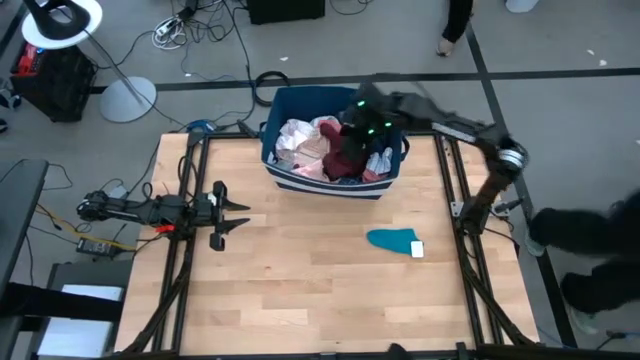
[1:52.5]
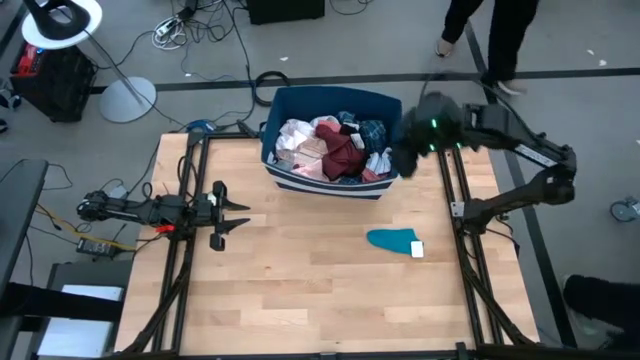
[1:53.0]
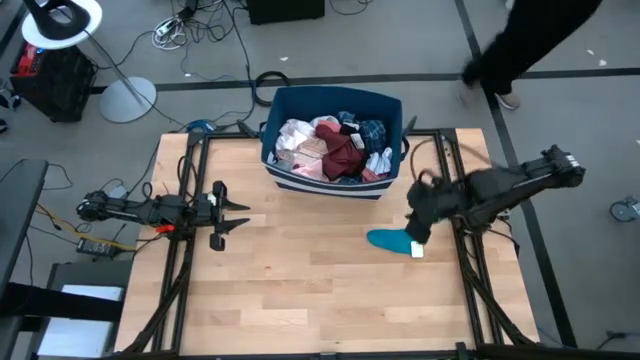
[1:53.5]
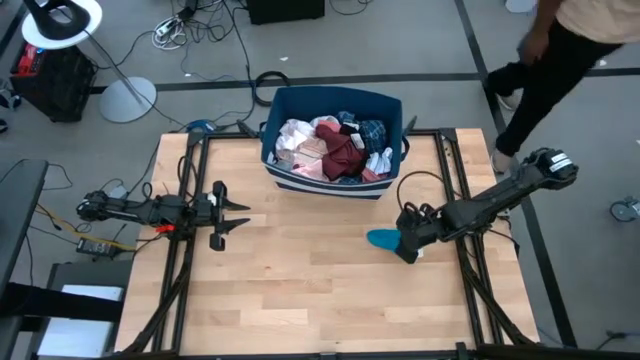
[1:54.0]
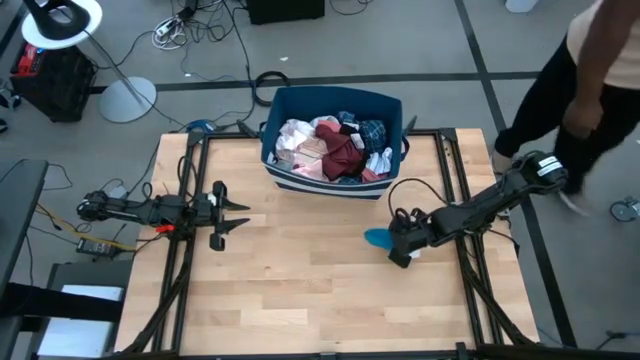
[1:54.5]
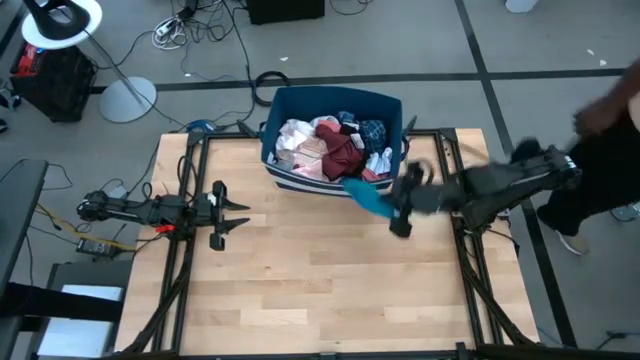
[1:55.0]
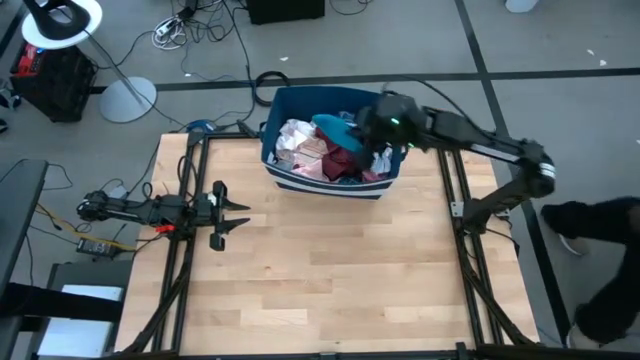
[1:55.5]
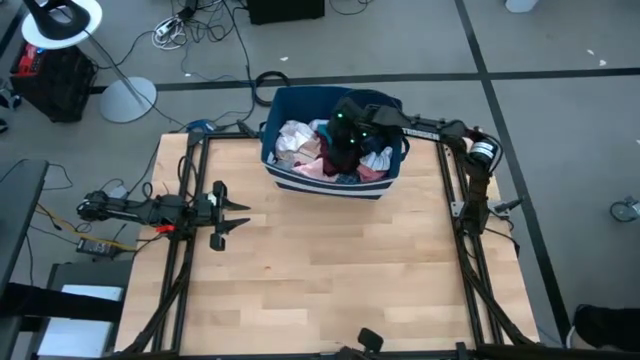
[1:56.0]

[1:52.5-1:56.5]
Task: Sort clothes
Put the blue sock into the blue bin

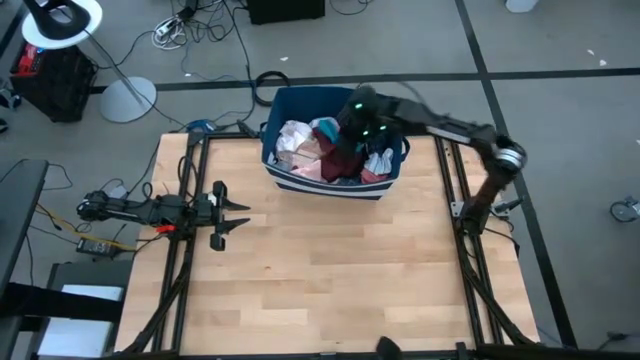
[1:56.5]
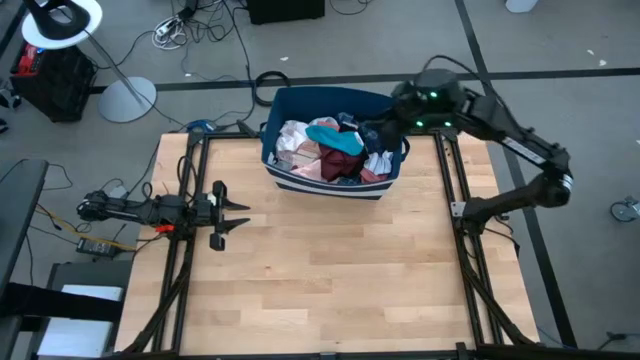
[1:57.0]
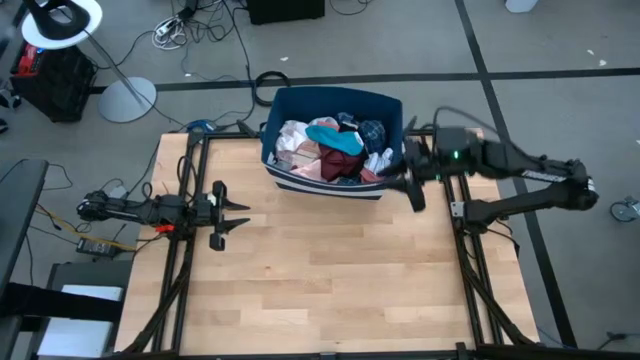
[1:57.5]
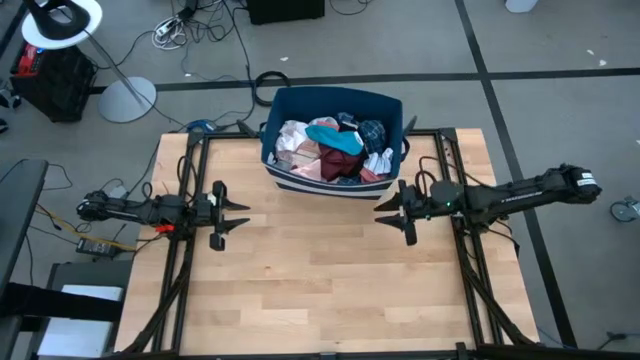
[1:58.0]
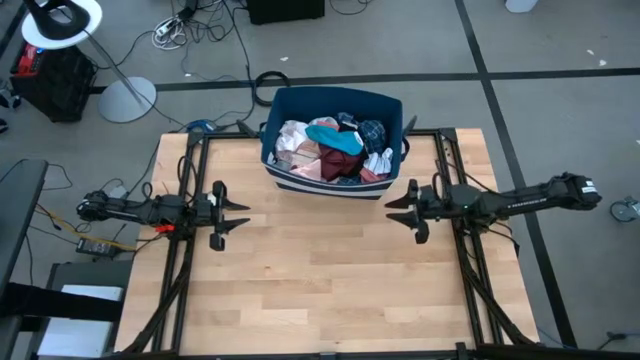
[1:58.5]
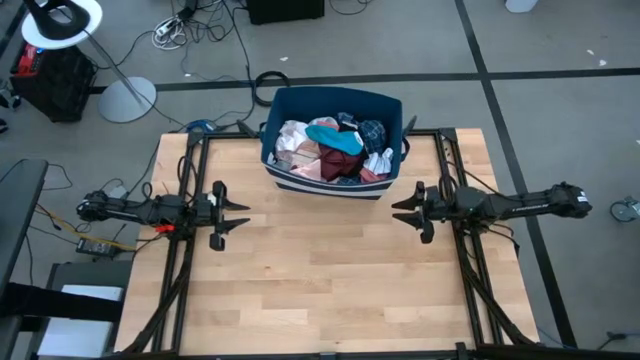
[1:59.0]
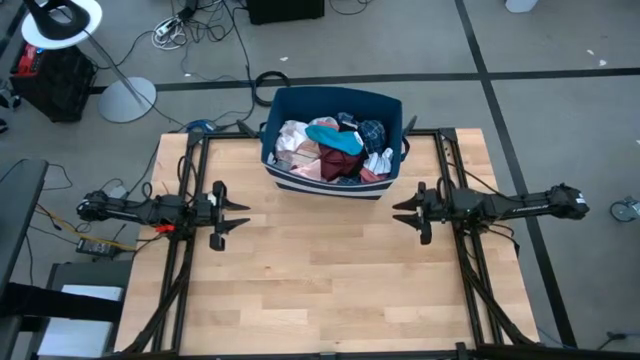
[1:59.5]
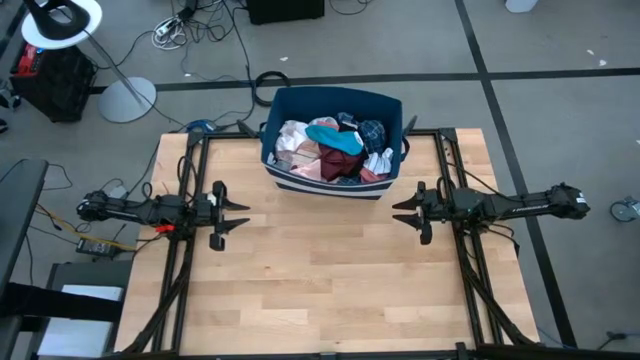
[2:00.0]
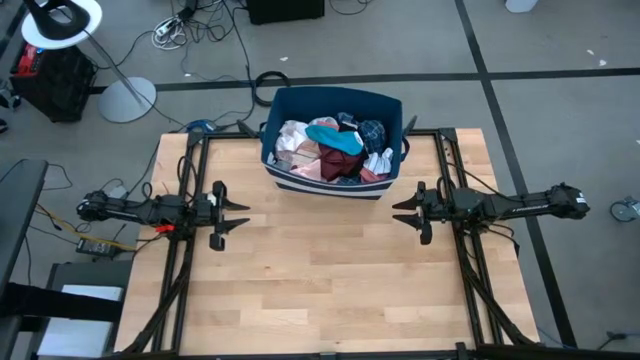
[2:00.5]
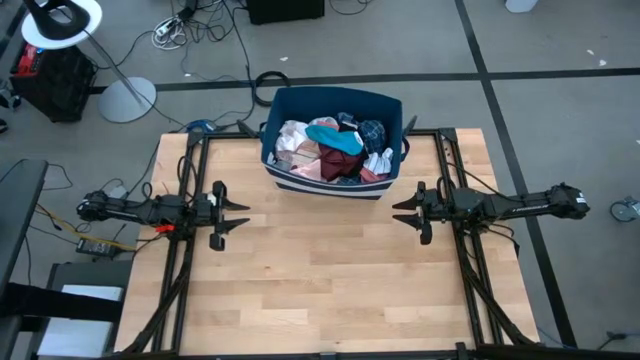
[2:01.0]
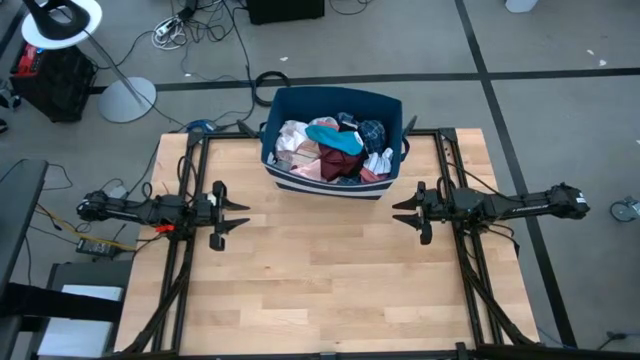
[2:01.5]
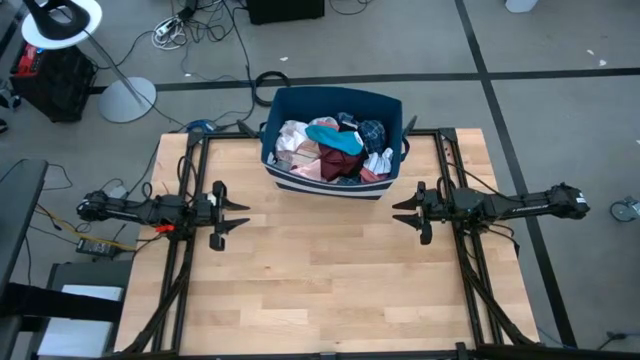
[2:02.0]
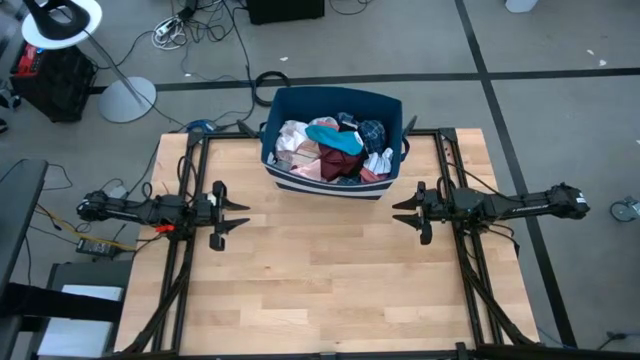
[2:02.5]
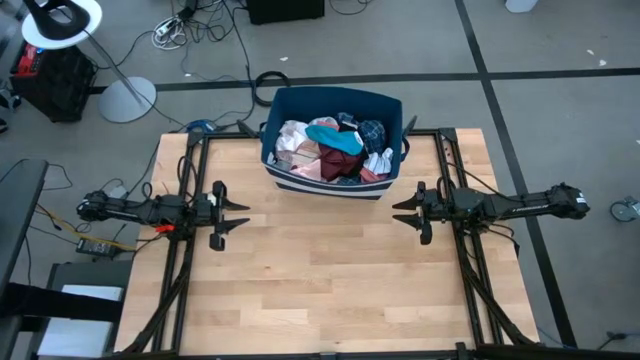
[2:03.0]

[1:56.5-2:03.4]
Return to Home Position

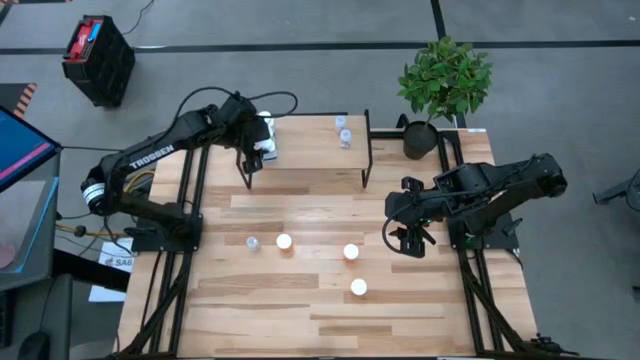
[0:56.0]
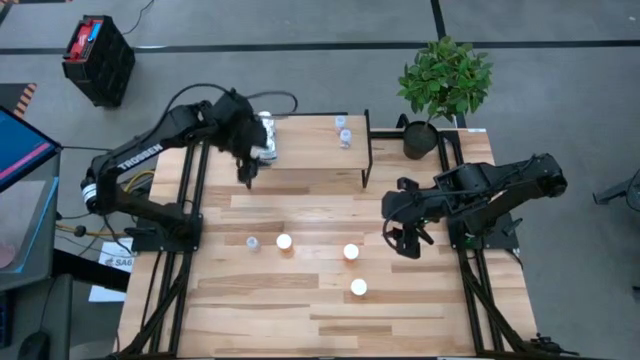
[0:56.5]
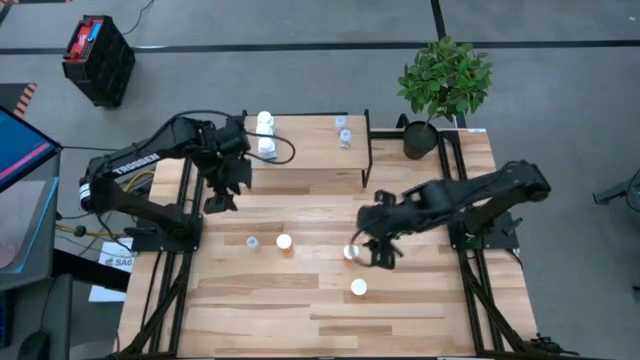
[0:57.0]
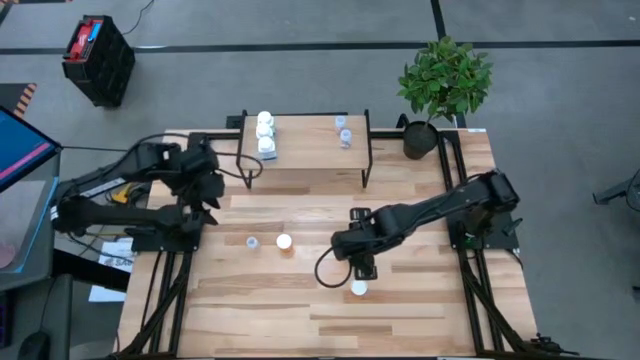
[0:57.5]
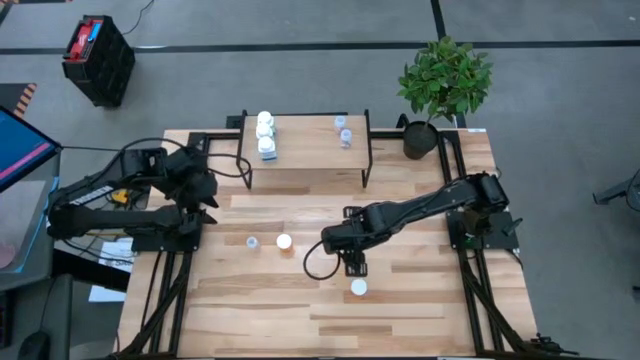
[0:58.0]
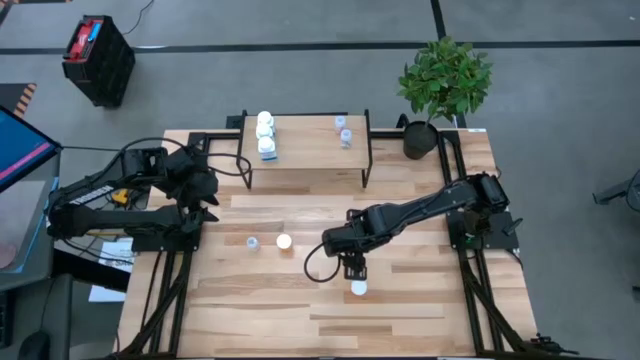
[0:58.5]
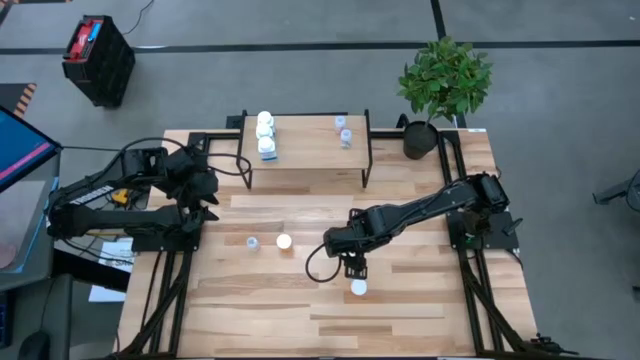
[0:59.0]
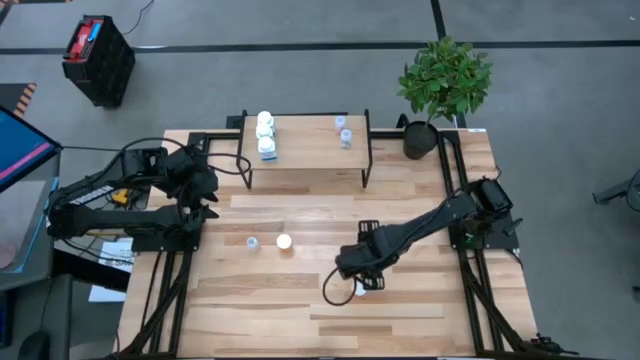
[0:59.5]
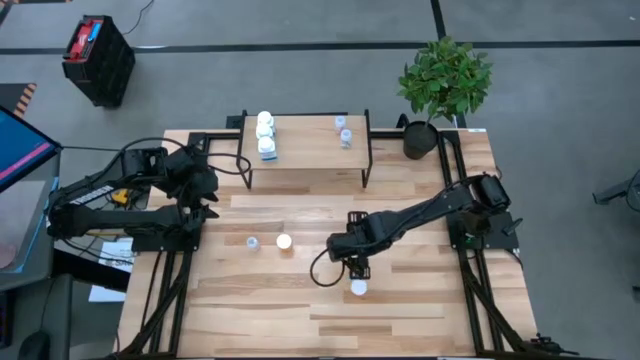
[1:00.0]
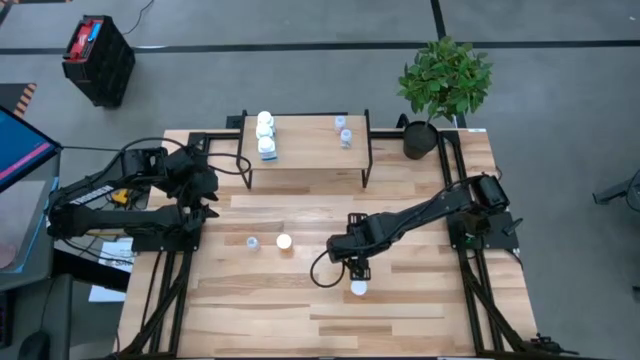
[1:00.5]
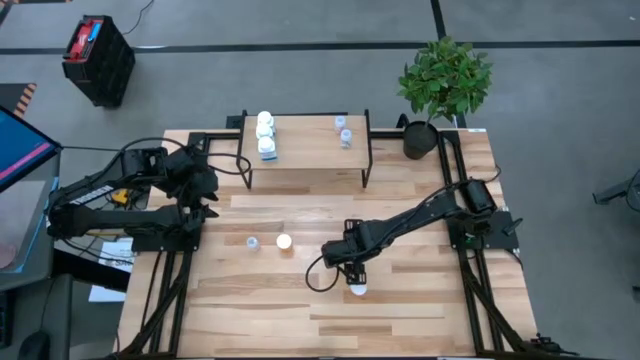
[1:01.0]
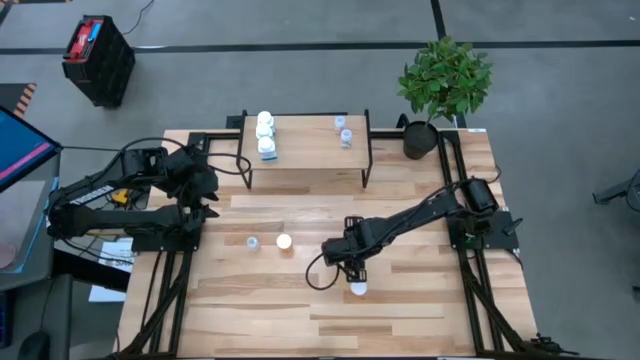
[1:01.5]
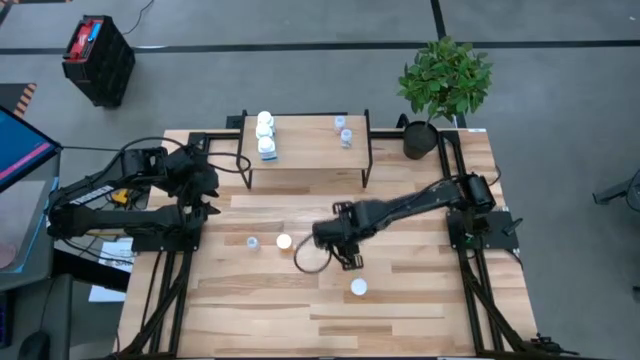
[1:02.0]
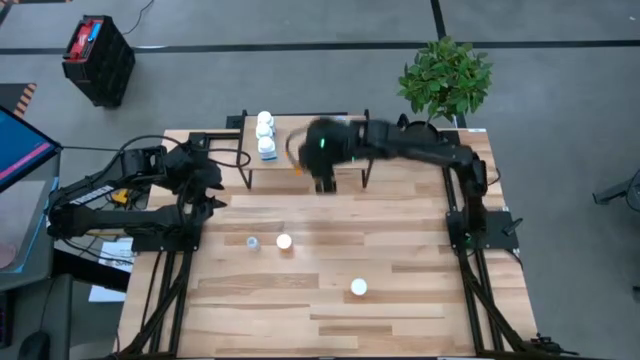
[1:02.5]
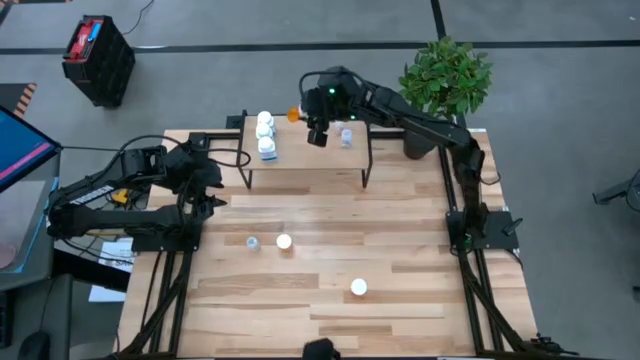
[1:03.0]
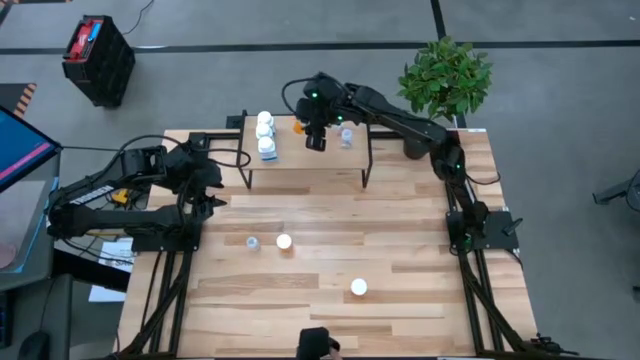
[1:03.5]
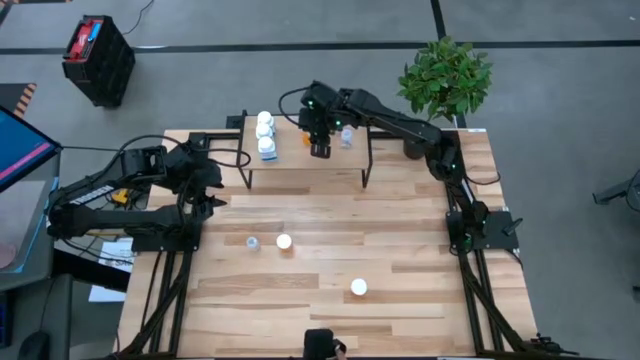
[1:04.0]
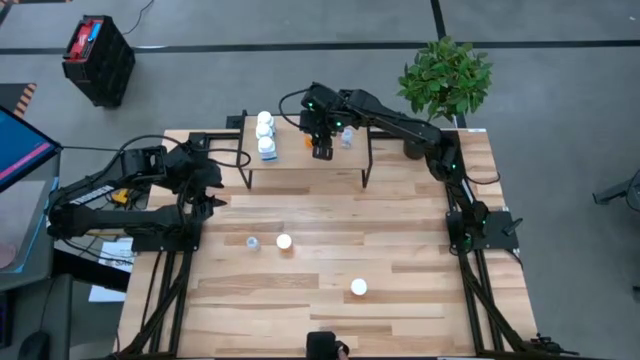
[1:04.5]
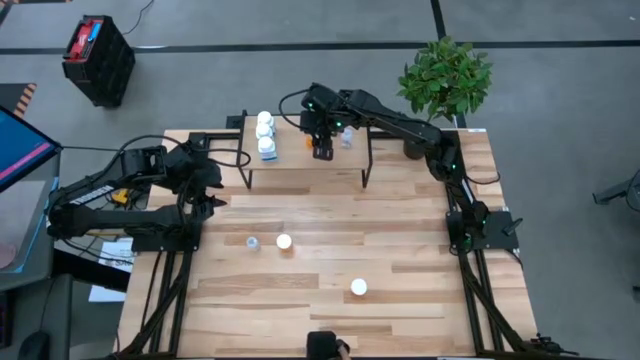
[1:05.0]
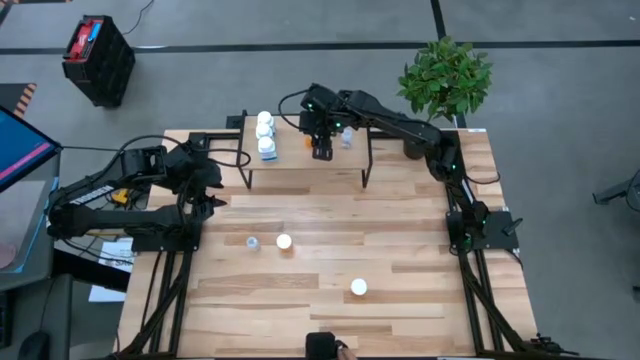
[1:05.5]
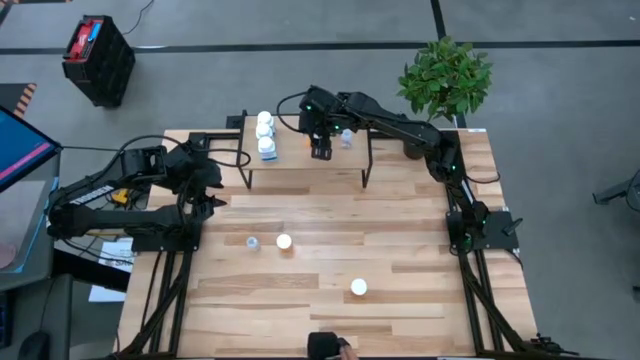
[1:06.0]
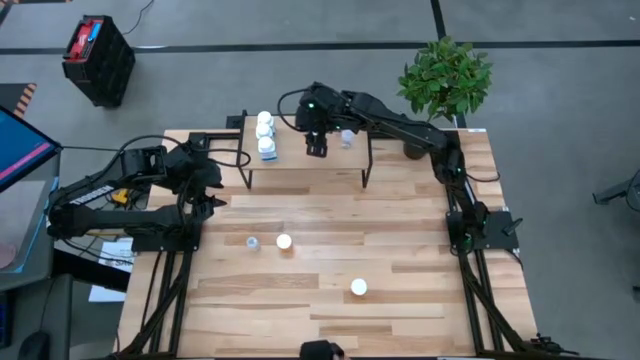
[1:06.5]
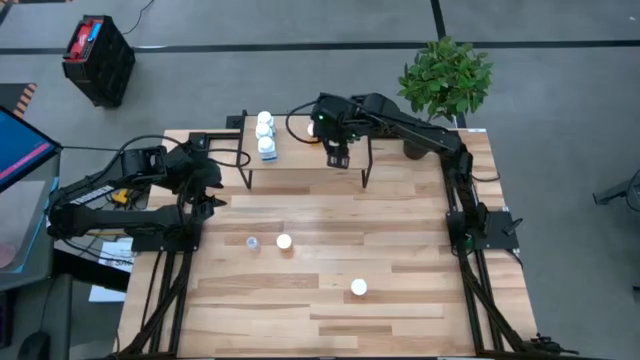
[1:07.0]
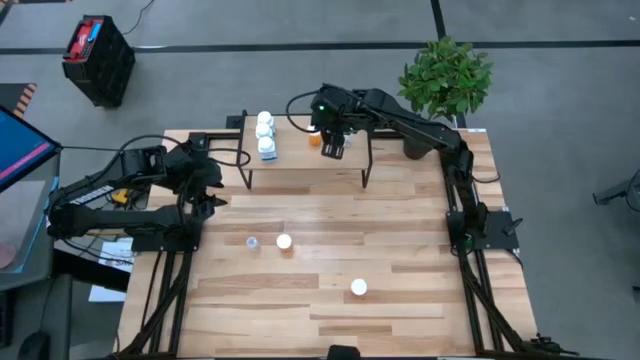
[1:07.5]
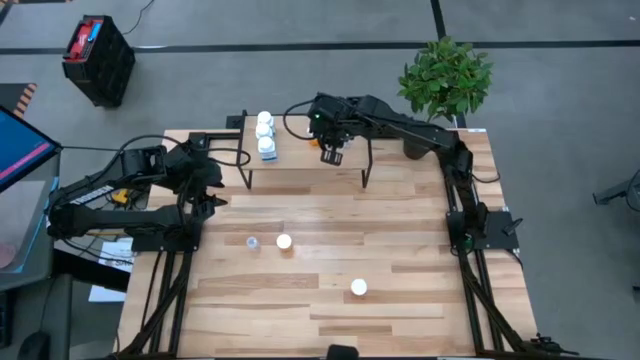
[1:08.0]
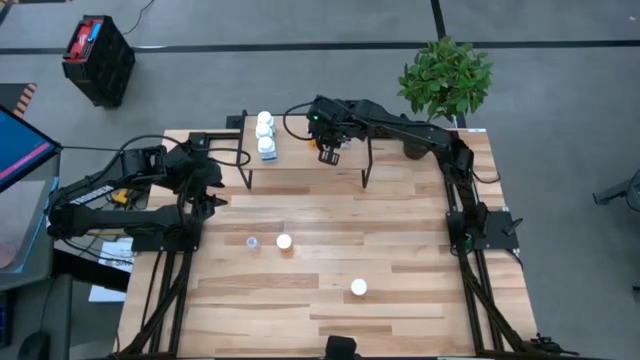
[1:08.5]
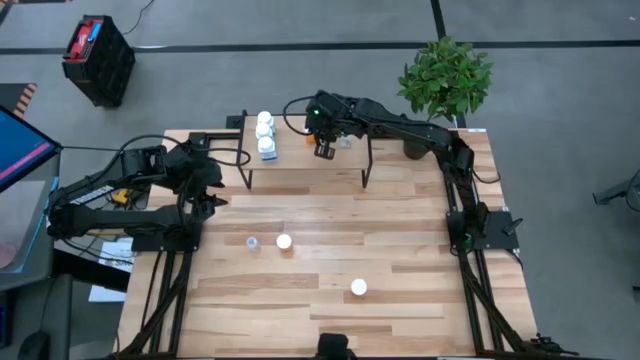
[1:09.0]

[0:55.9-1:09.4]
Task: Pick and place medicine bottles onto shelf by color
Put the top right orange pill bottle on the shelf
